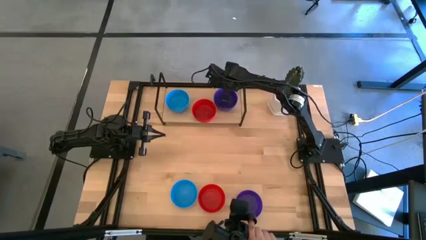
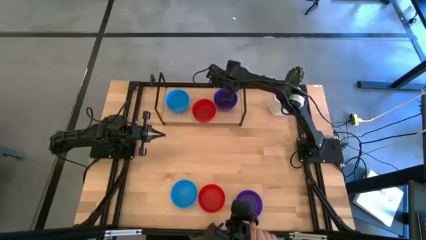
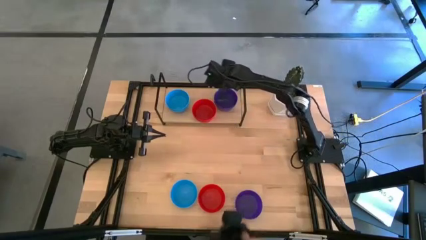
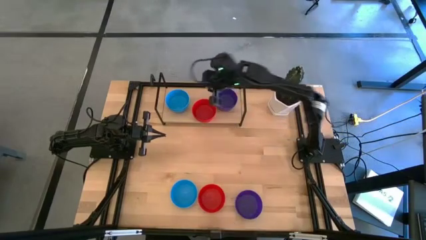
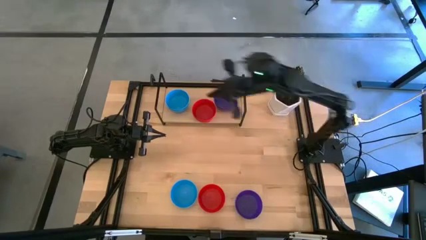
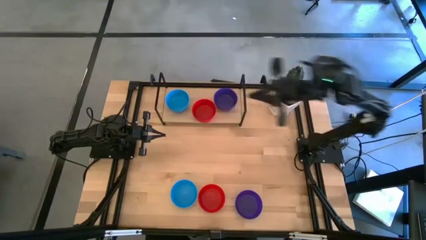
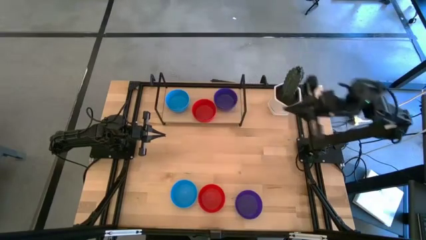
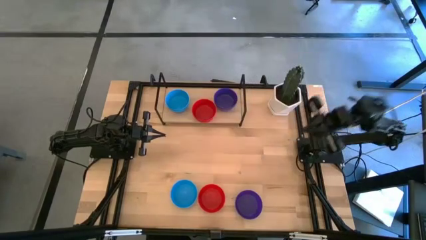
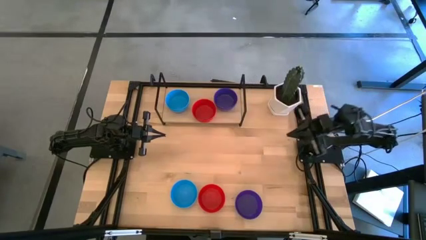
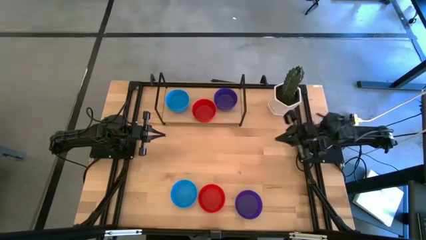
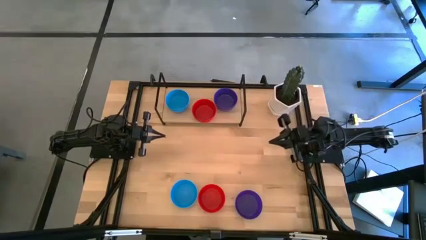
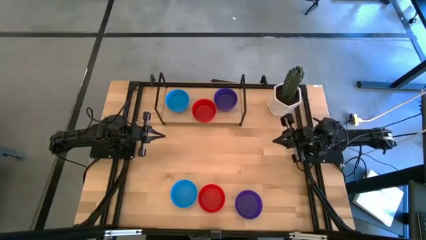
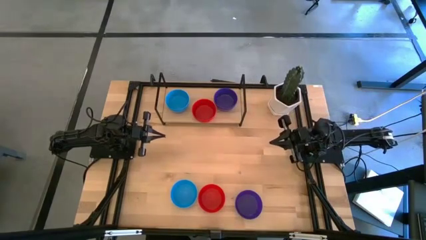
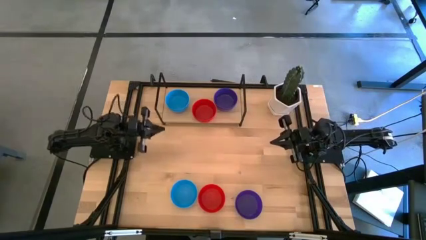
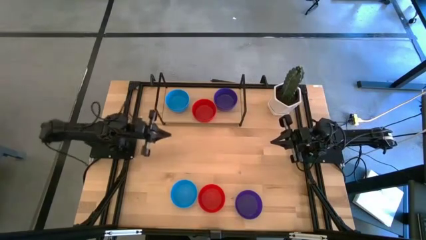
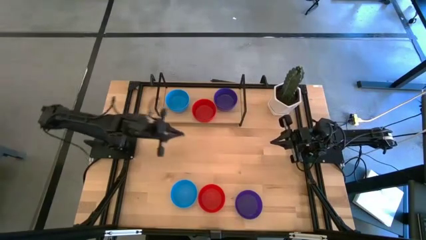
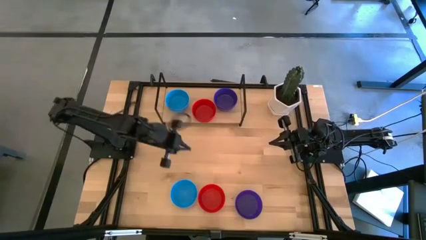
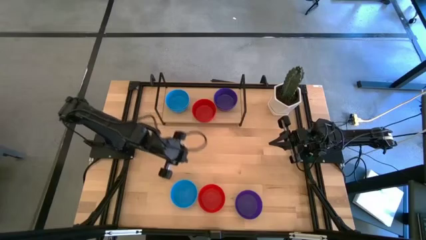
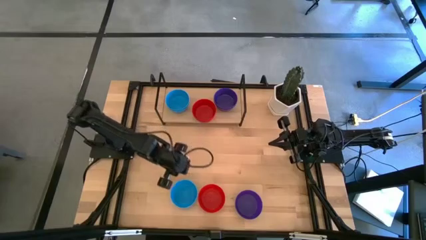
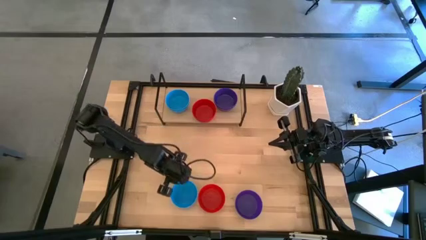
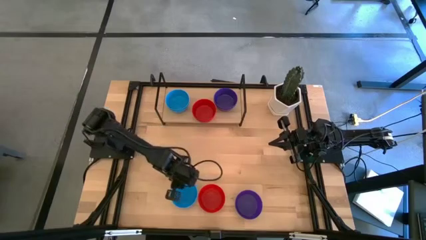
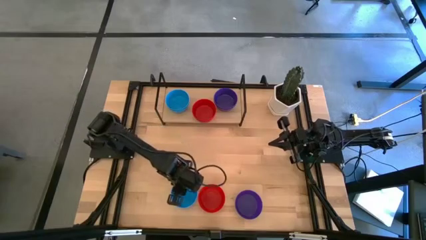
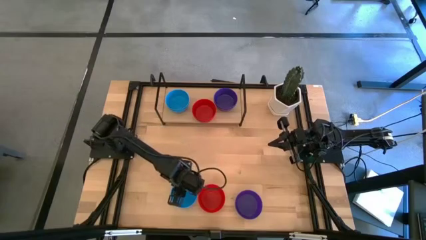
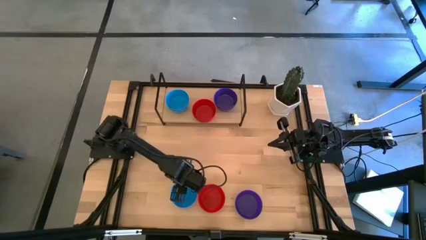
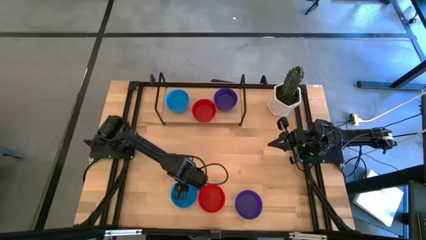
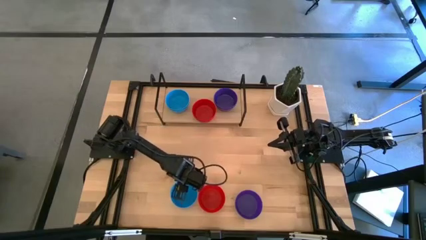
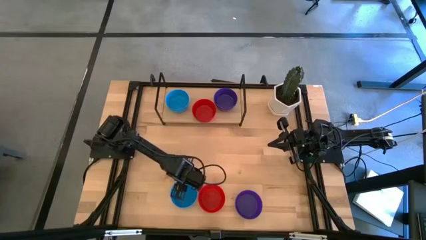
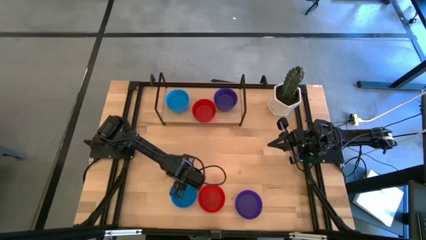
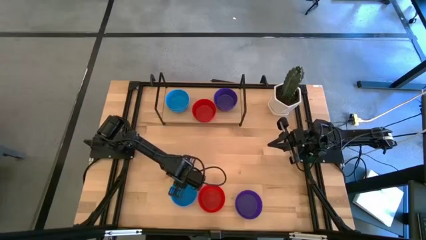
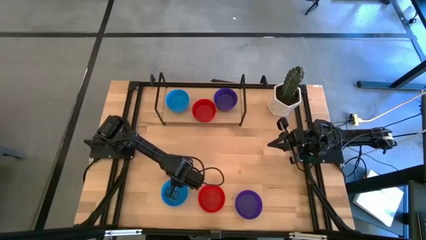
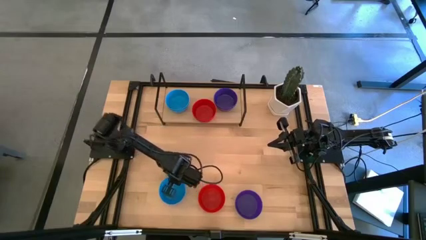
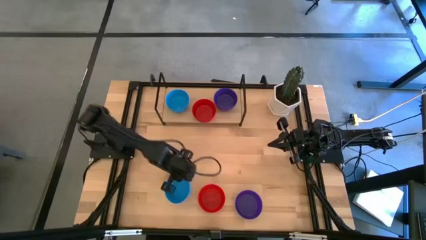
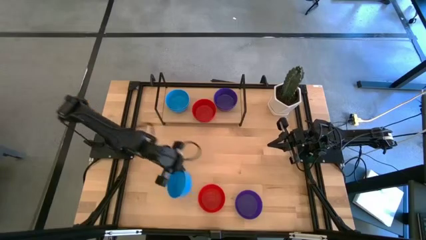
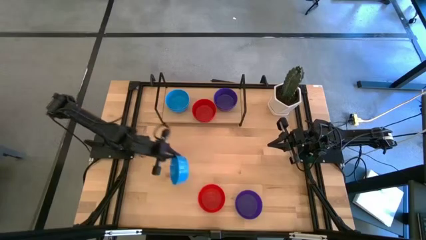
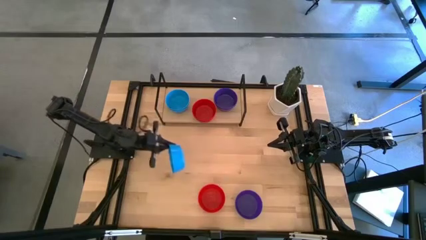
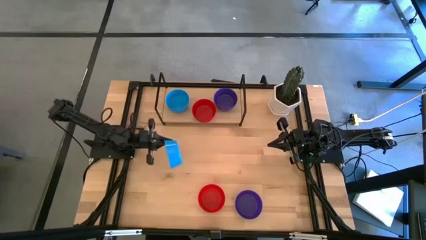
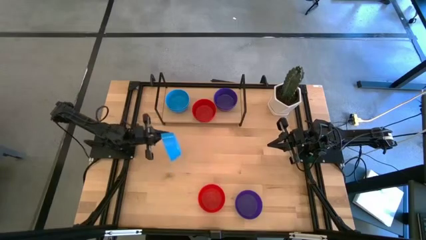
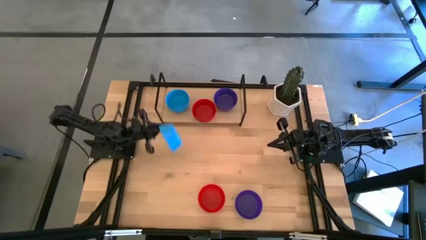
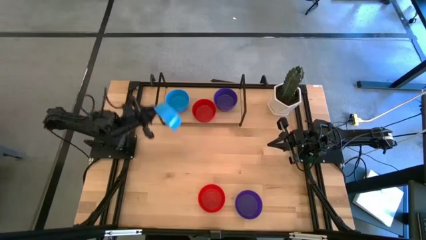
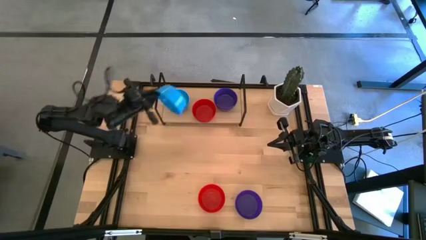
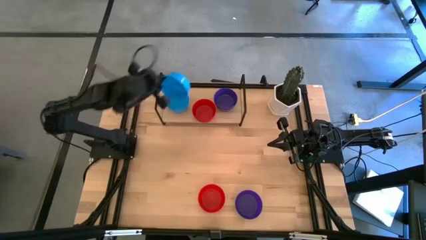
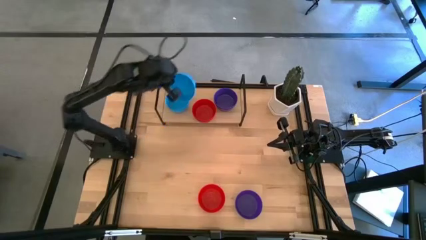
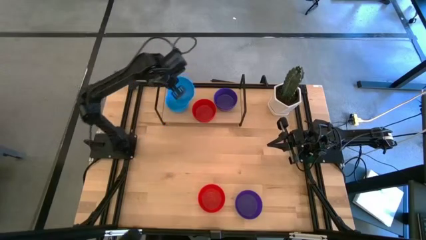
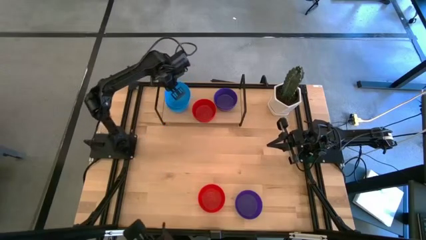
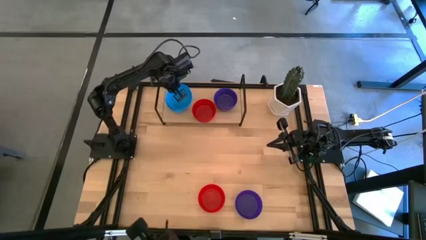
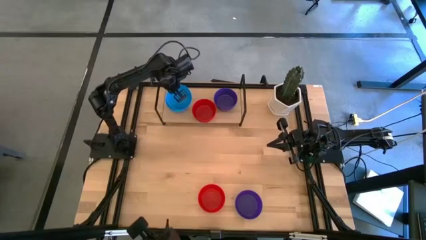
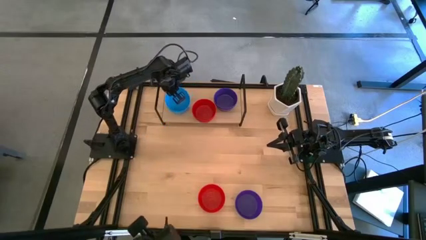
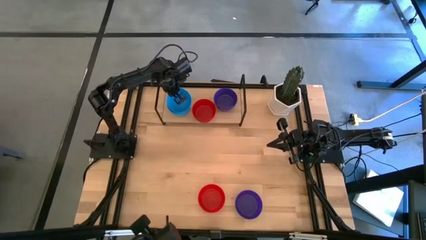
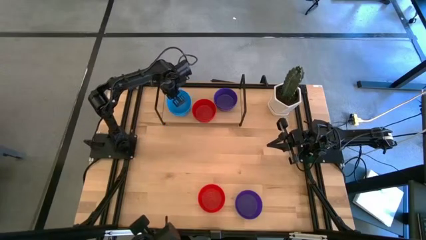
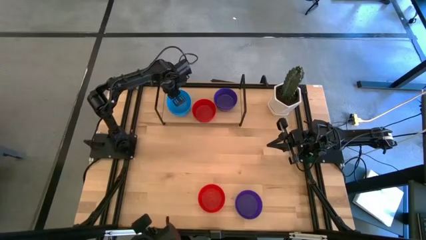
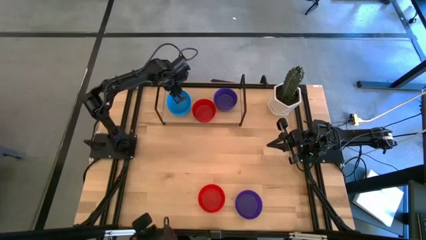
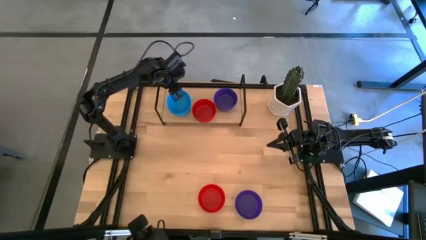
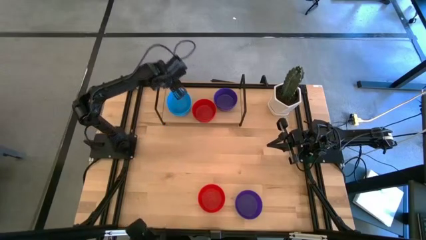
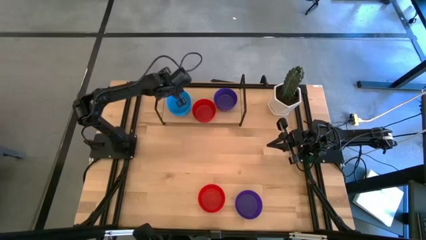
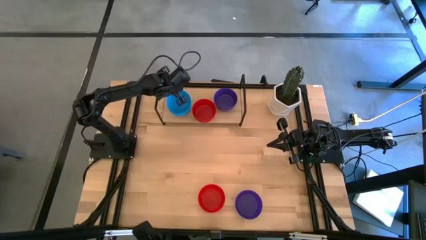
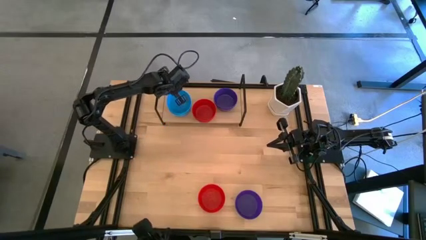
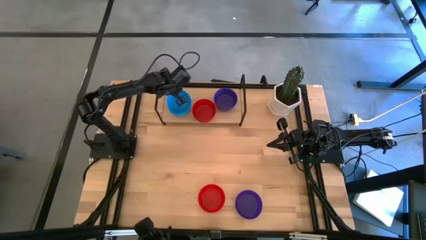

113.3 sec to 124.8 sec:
Task: Pick & Place Mini bowls
Stack the blue bowl on top of the blue bowls on the shelf

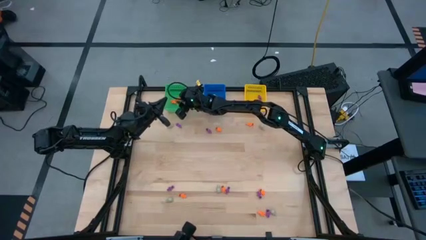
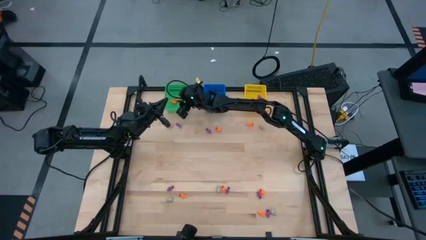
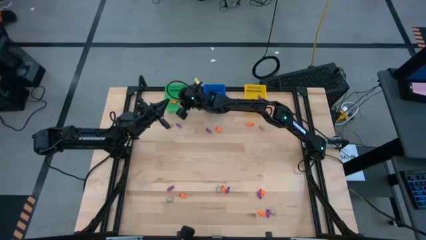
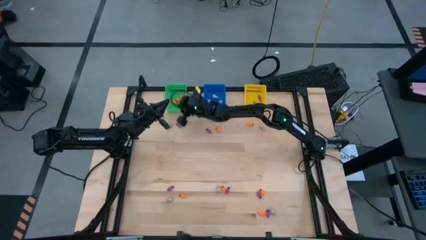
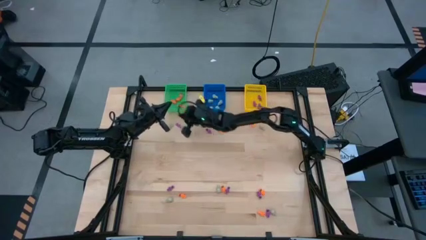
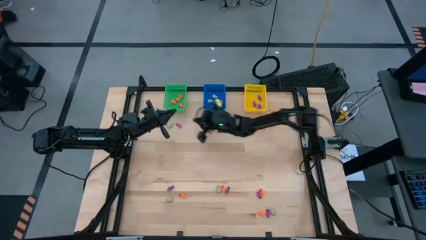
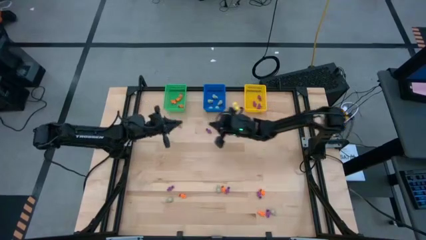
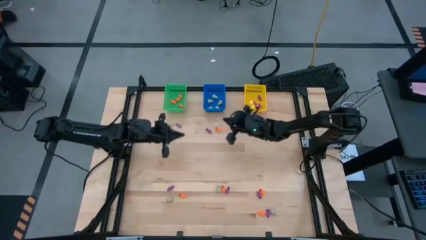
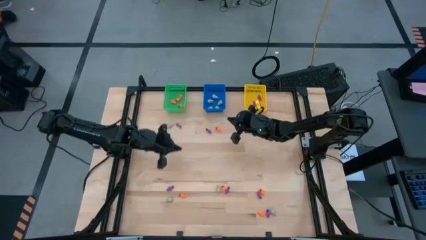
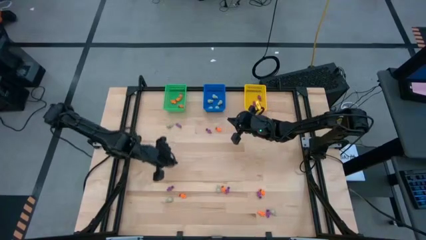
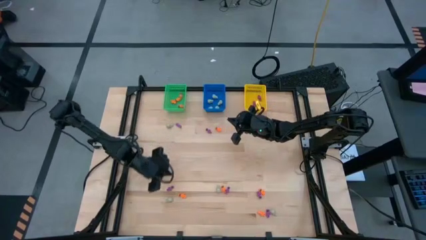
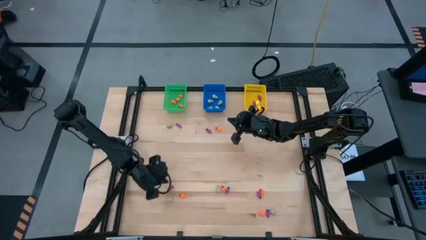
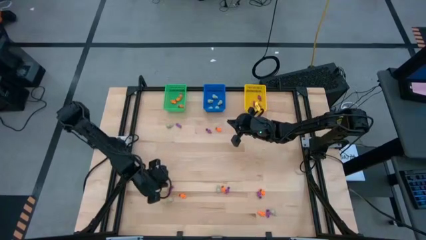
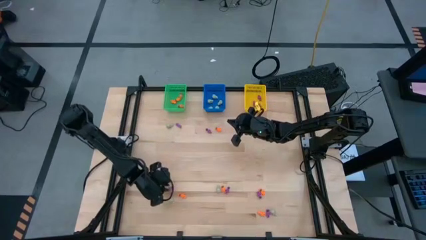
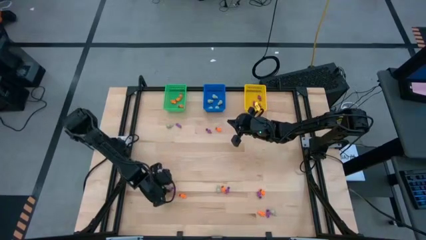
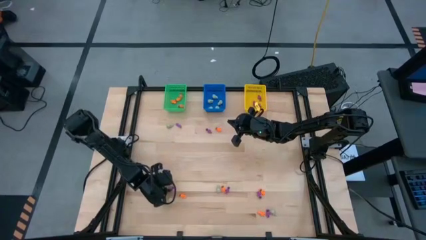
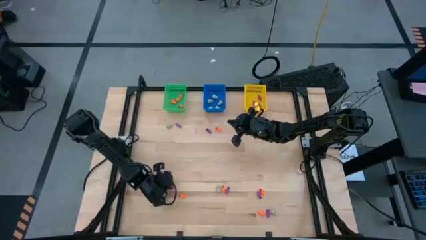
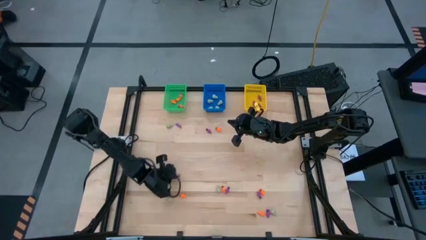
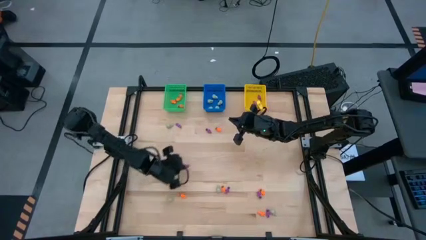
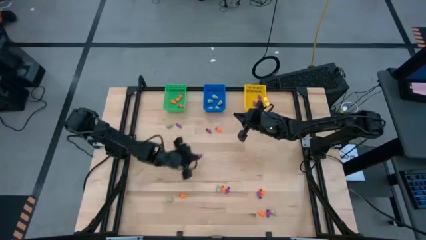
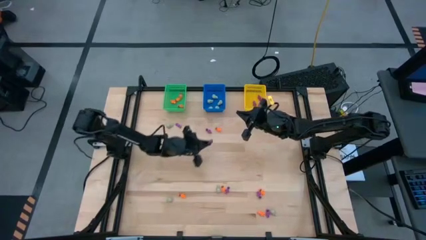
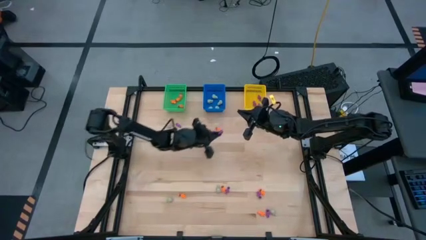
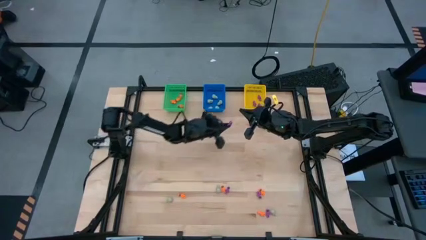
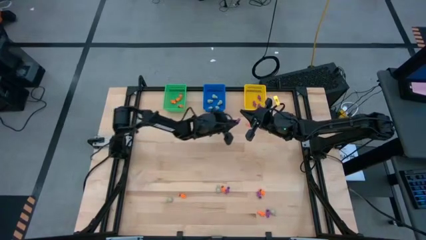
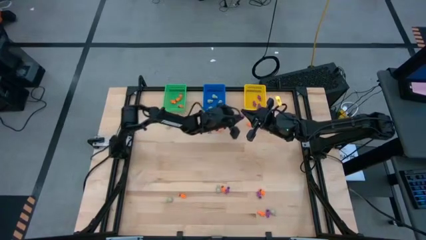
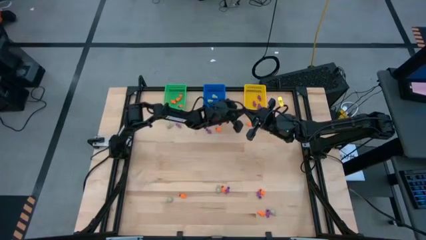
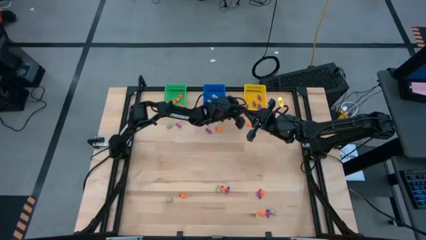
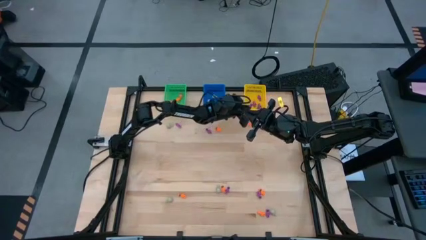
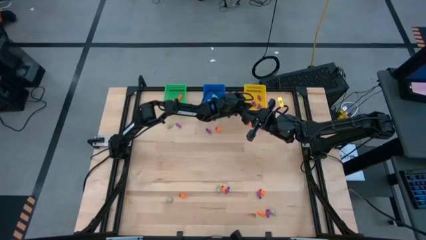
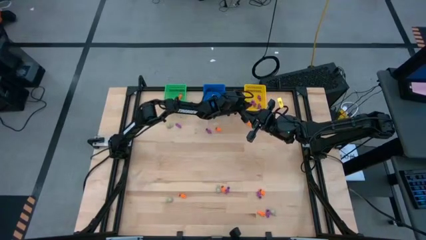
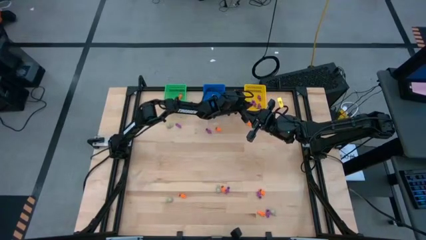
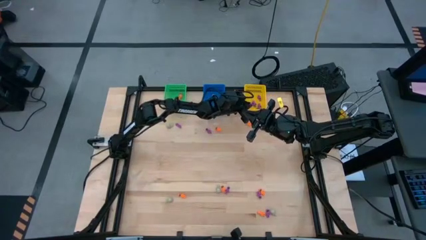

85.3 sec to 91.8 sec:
Task: Sort Halloween decoration
Put the purple skeleton toy into the yellow bin
